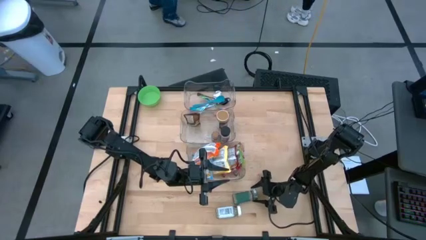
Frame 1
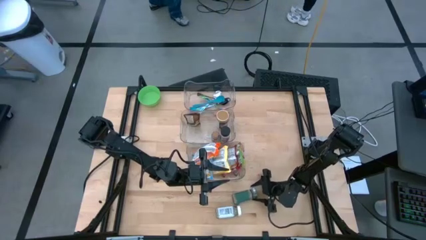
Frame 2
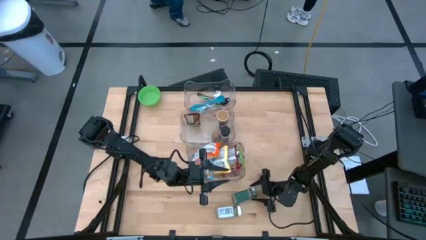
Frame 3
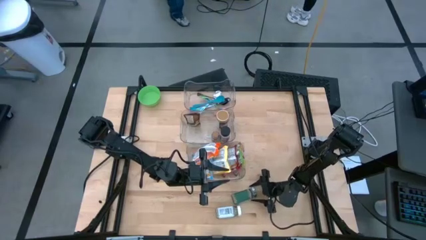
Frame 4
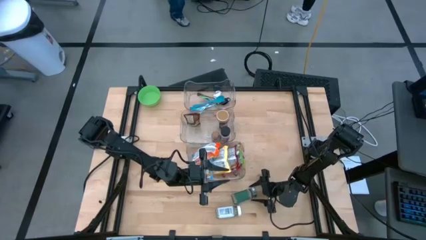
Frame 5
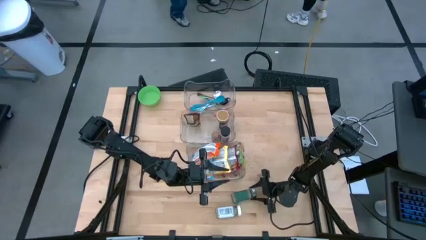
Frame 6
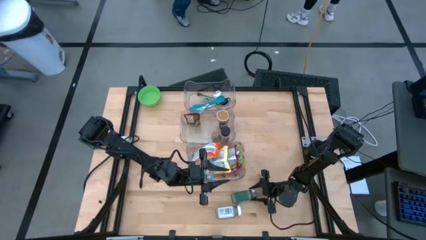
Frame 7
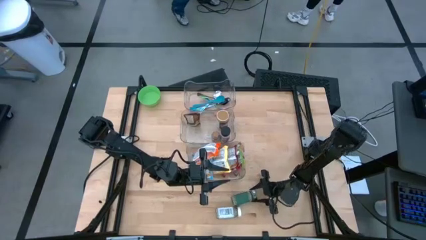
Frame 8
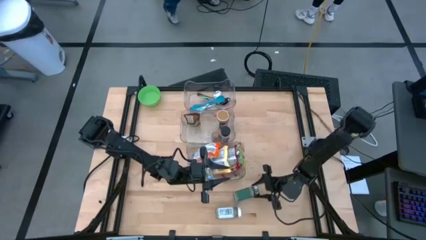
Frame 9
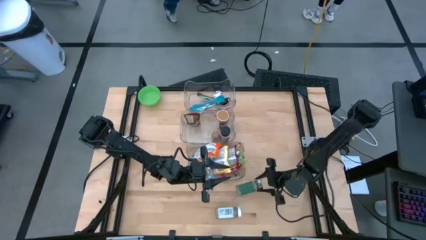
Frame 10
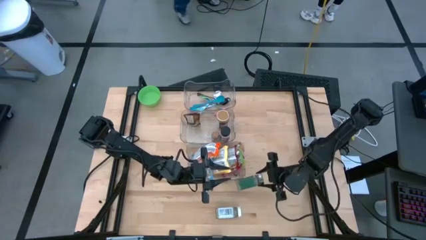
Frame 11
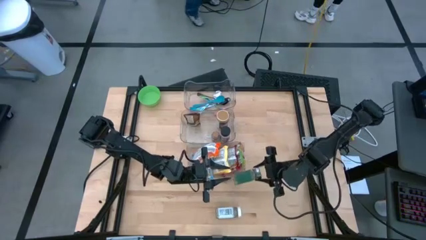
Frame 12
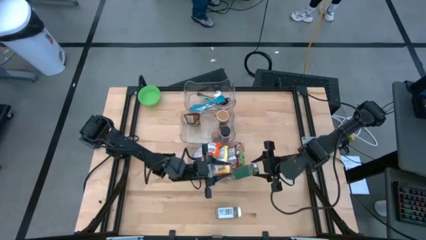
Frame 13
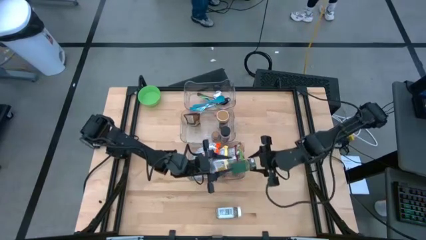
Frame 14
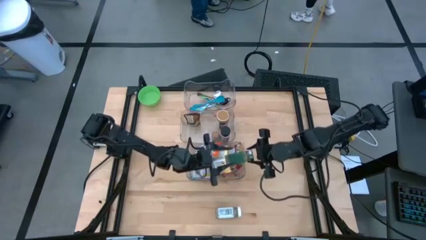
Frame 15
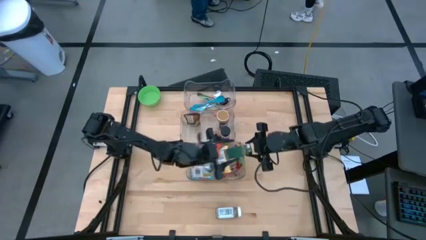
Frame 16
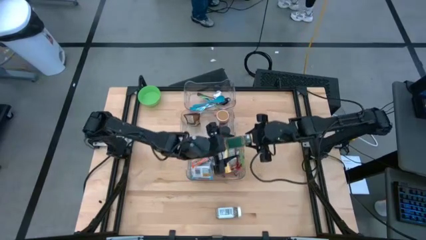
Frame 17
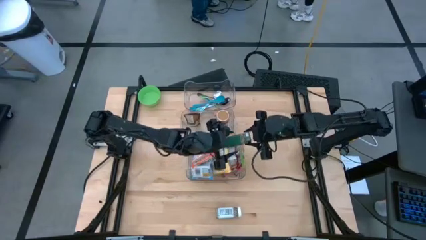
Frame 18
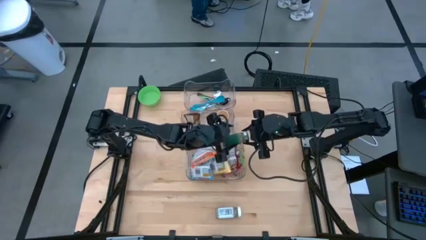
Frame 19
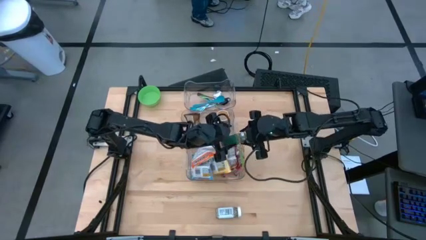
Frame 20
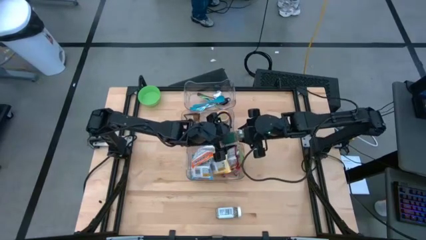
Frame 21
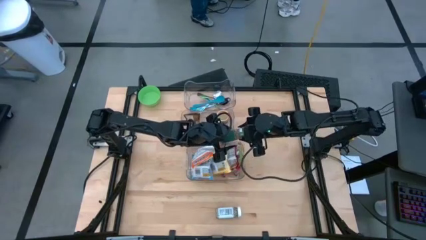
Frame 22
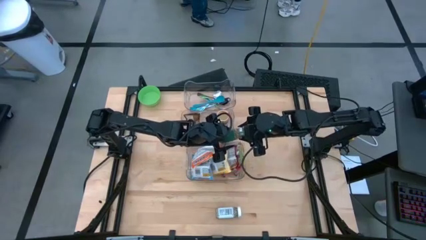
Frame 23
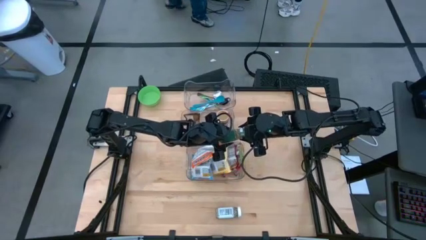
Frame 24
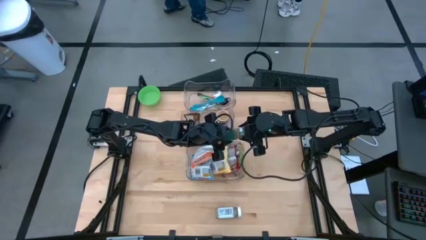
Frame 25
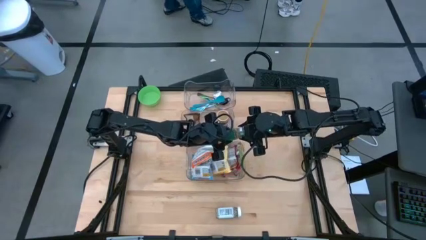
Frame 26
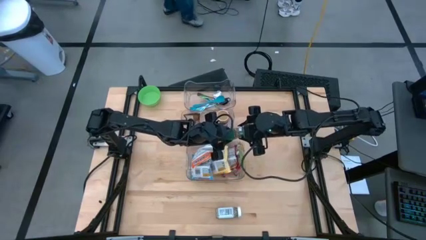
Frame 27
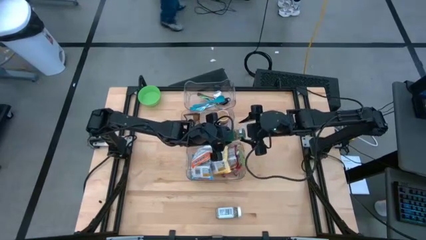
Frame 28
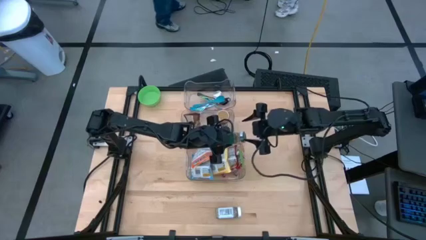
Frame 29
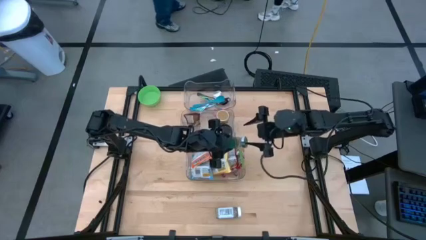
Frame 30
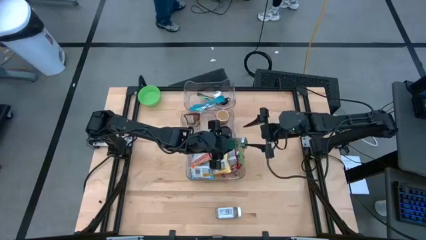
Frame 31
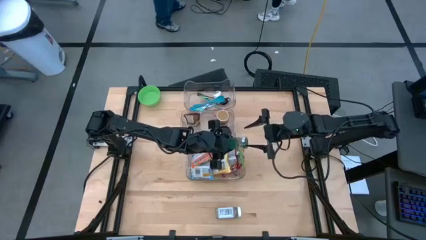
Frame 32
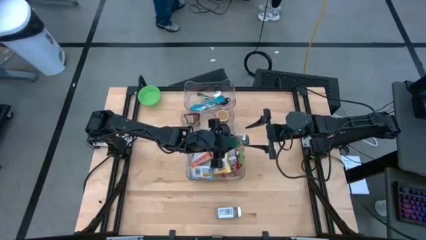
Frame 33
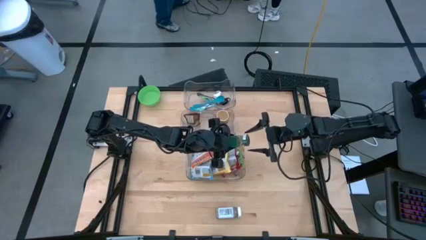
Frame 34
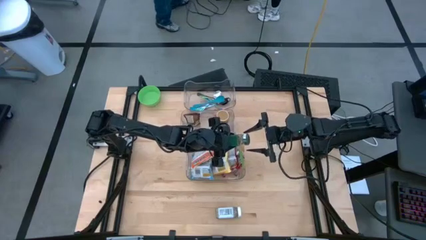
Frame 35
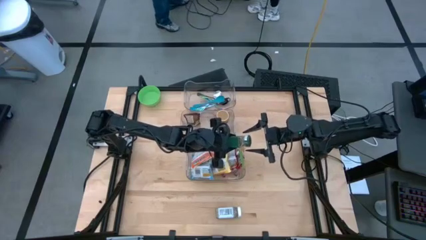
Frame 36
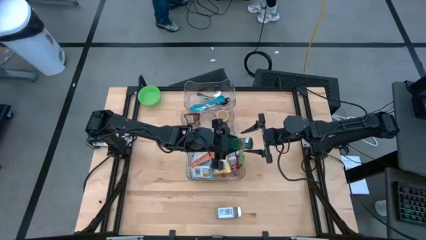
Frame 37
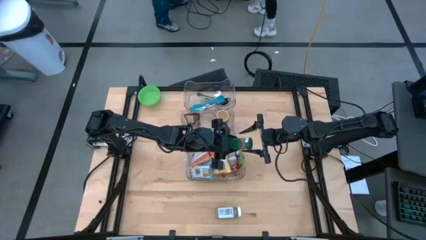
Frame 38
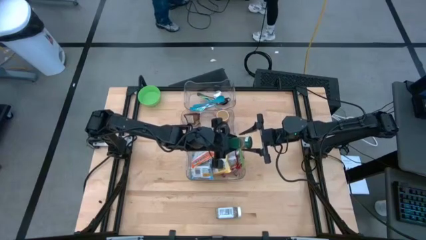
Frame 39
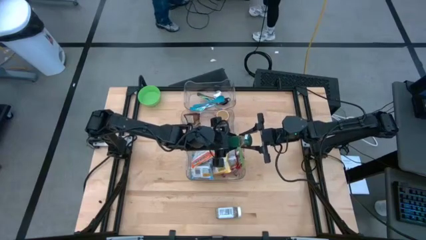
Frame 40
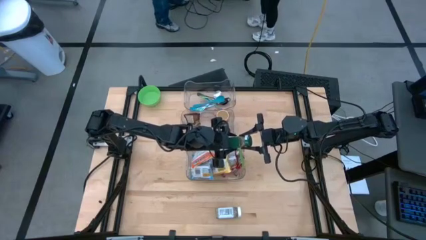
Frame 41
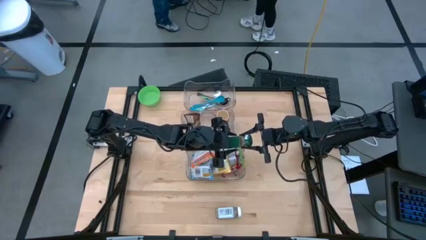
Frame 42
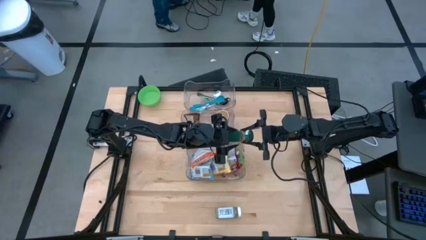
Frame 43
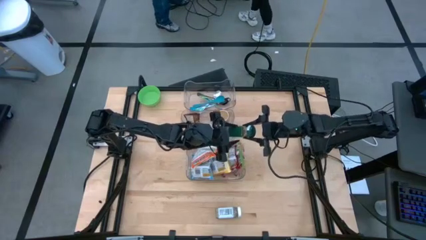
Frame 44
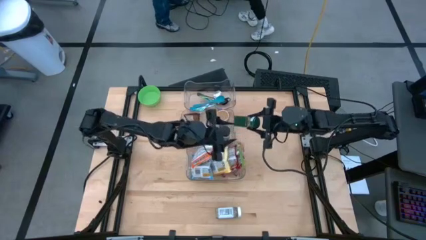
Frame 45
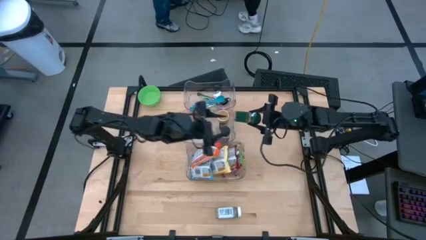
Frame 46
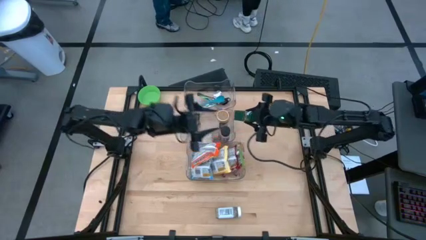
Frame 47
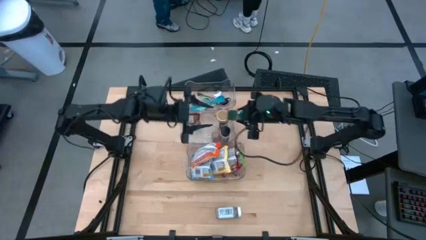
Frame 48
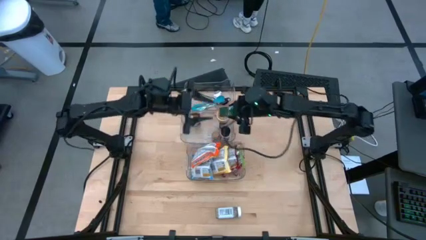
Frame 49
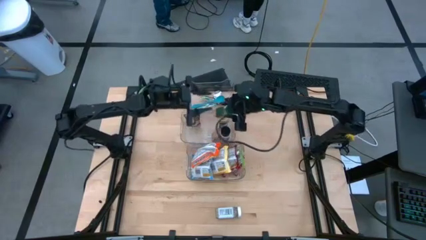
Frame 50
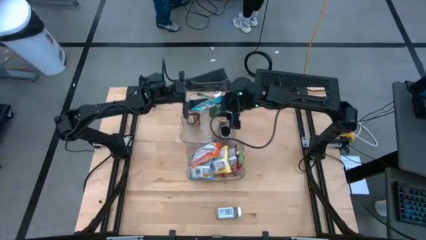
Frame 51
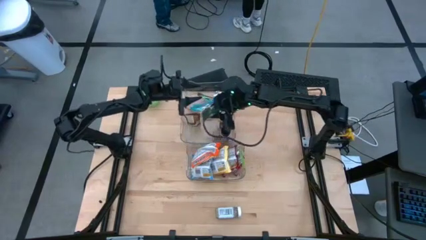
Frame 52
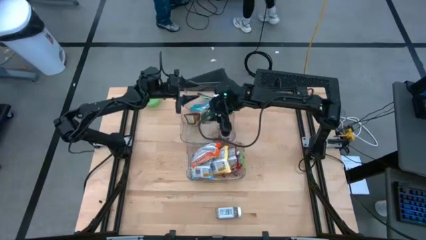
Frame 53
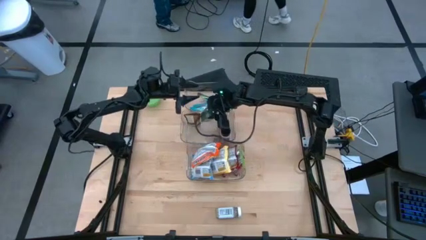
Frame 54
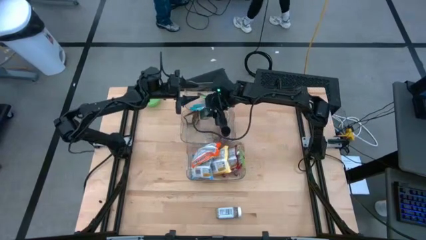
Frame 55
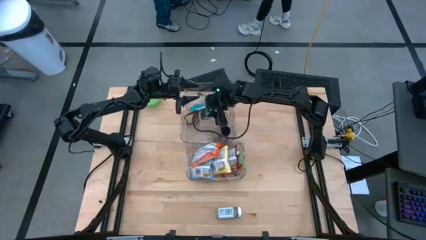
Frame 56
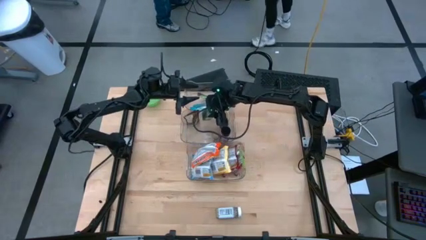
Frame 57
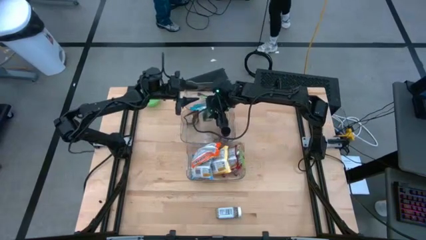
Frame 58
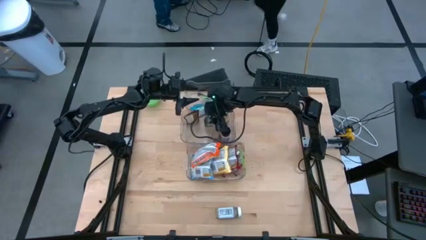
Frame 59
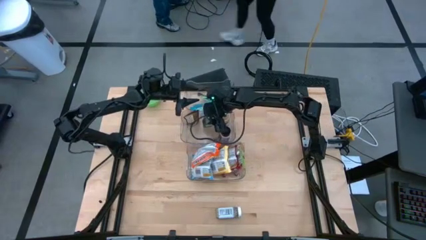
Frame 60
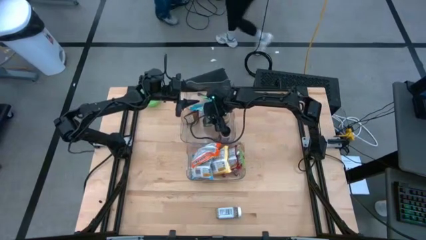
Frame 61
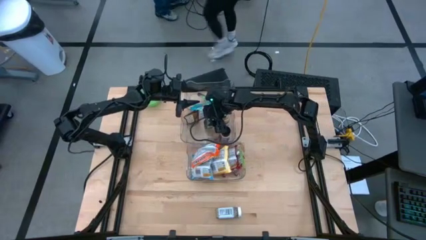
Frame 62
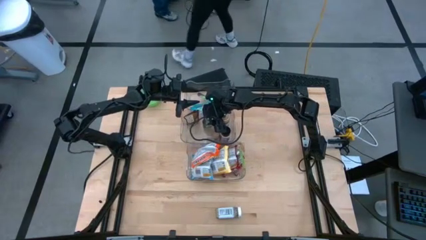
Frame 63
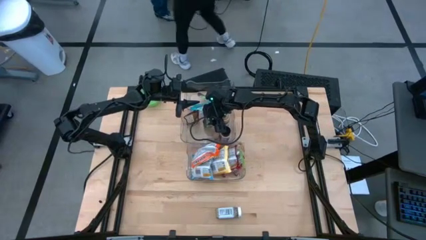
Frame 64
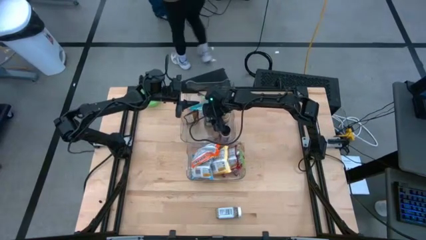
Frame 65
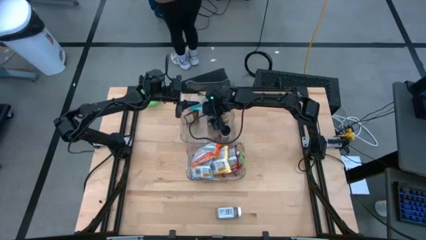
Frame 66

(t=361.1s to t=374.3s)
Task: Pick & Place Food Item
Put the green seasoning bottle into the middle transparent bin

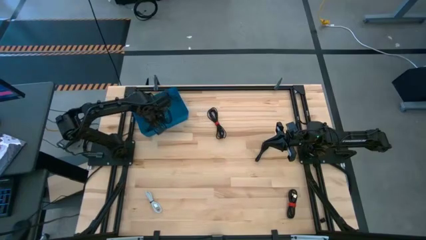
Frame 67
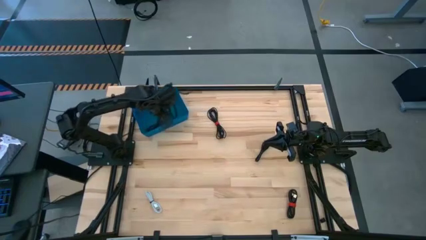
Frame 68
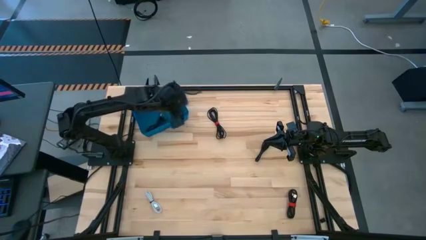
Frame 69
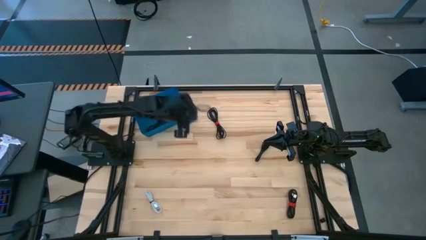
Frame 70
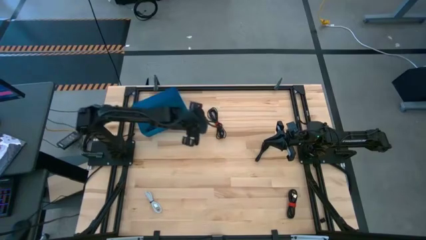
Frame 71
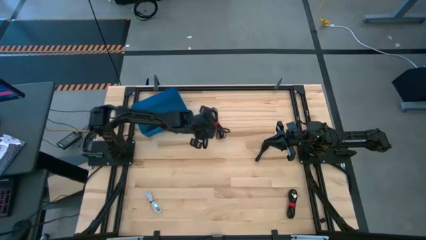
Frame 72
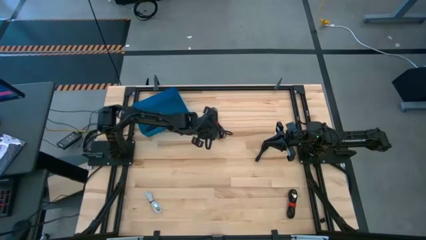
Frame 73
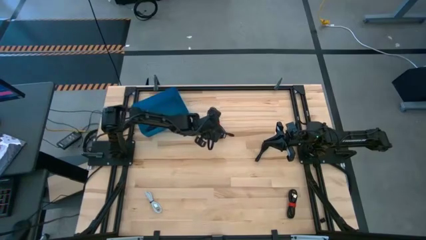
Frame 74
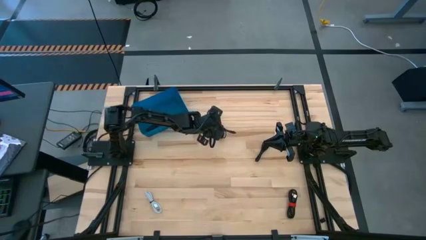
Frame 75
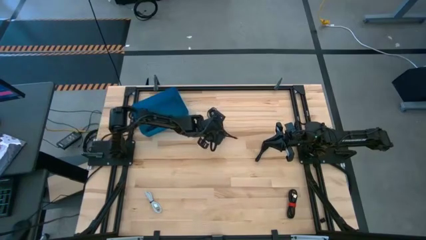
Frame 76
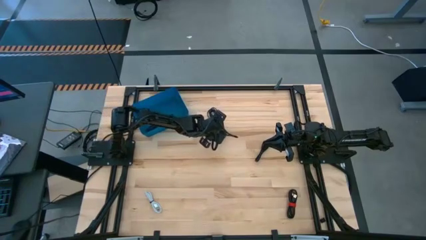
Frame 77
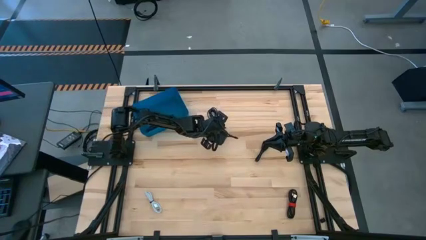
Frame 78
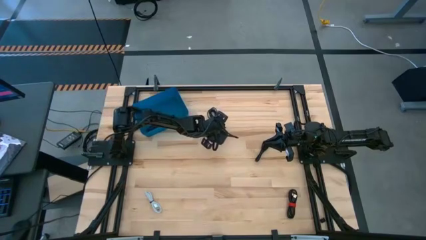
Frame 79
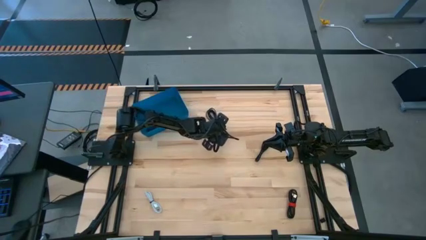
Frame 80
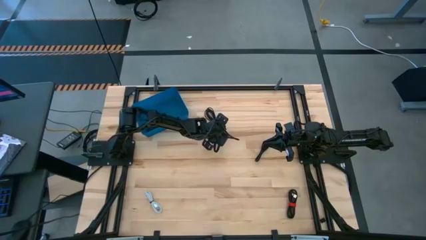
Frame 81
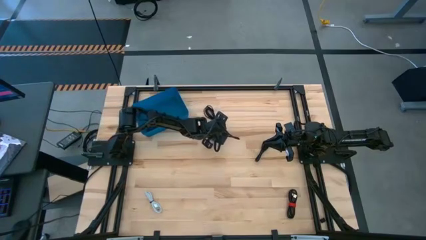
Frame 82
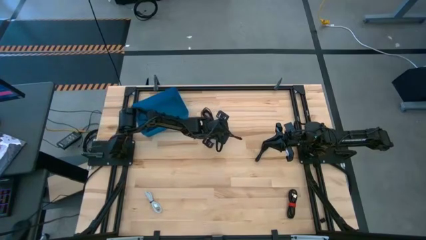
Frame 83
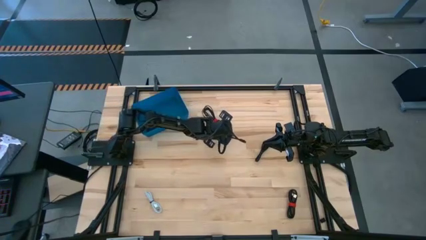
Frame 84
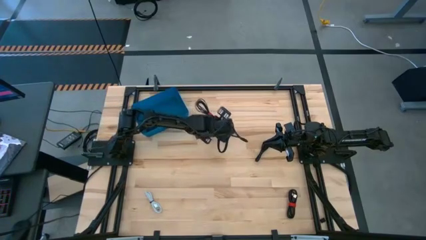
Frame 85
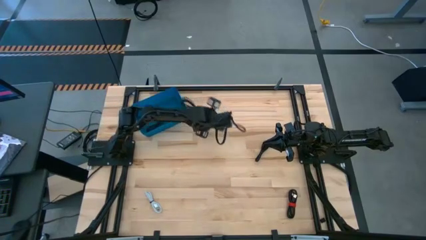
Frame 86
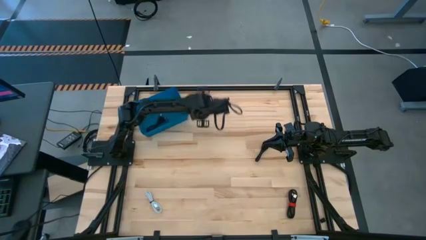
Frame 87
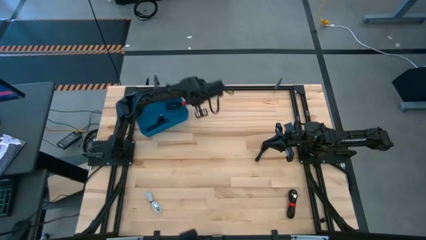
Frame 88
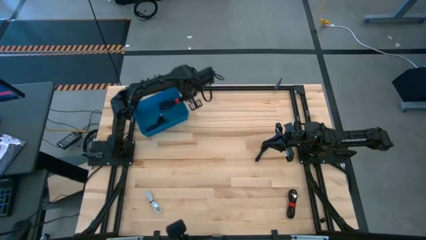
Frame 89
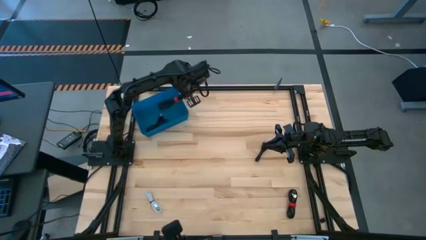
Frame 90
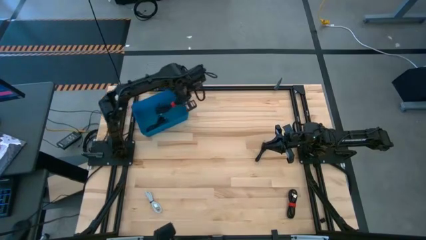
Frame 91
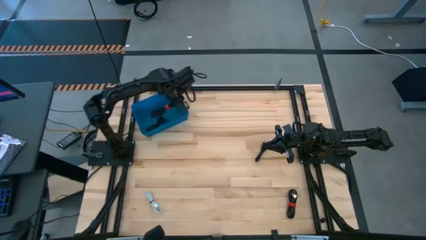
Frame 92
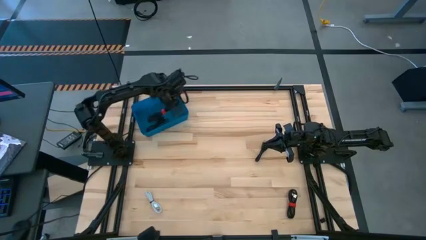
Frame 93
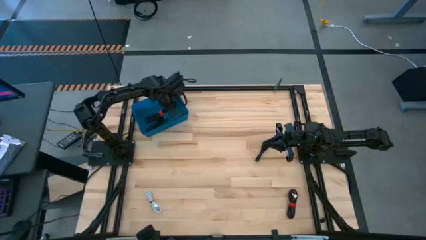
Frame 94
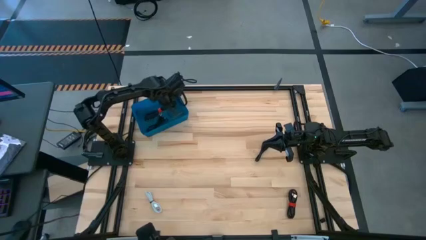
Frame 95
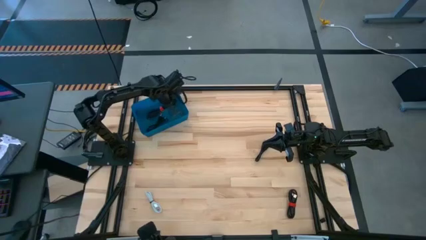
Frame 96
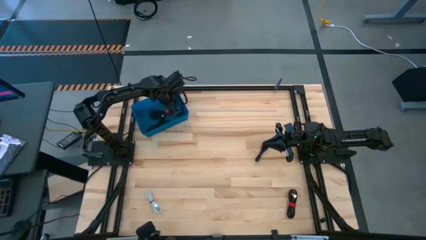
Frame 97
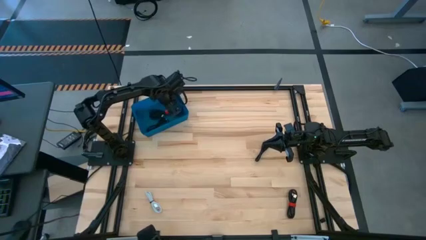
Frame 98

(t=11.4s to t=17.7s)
Task: Pick and place USB-C Cables
Put the black charger cable into the blue bin
